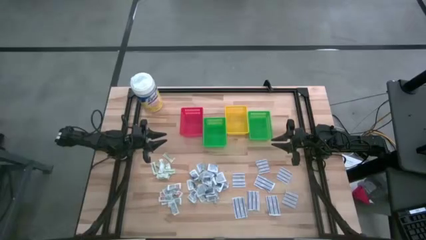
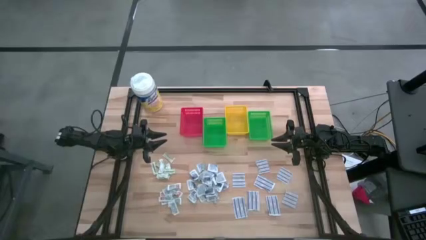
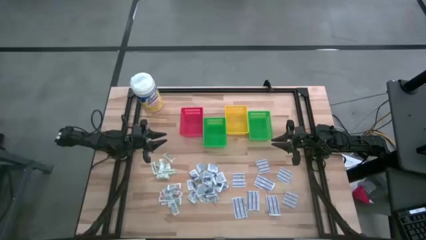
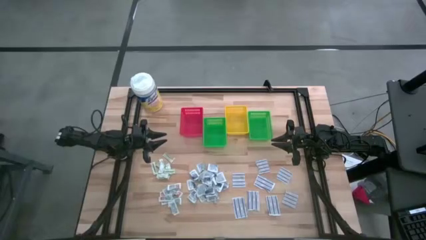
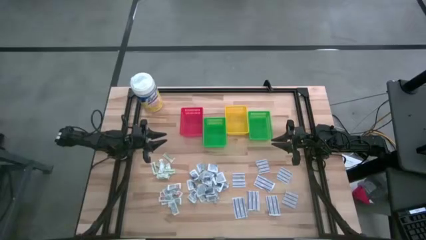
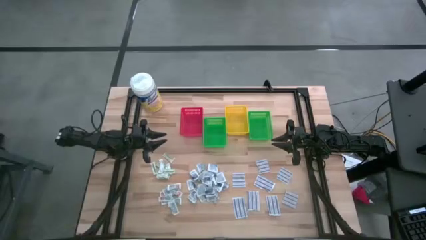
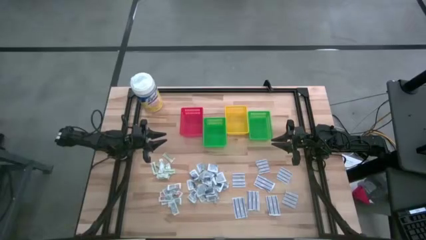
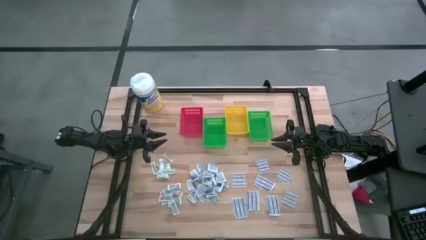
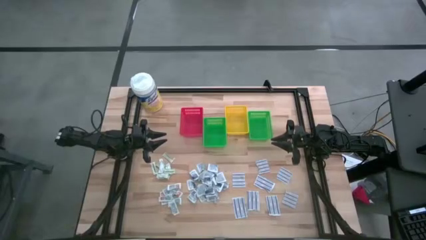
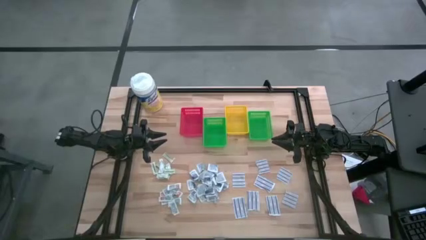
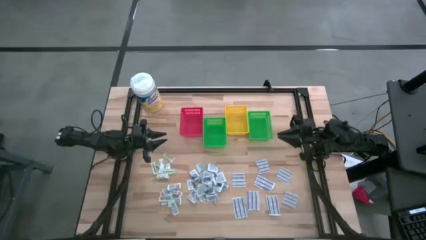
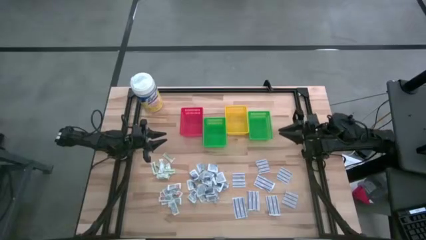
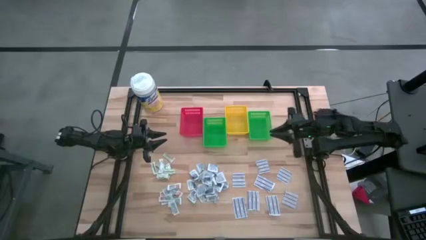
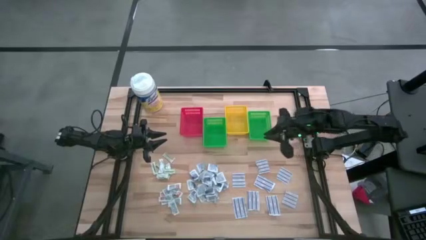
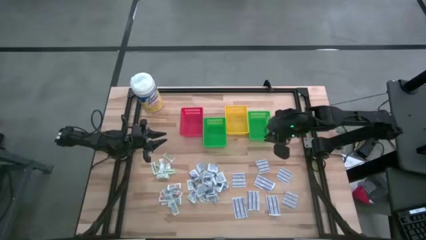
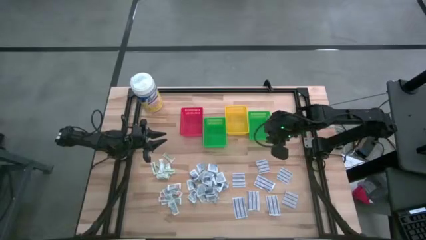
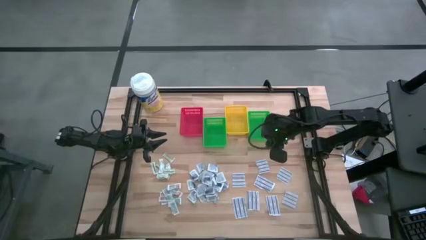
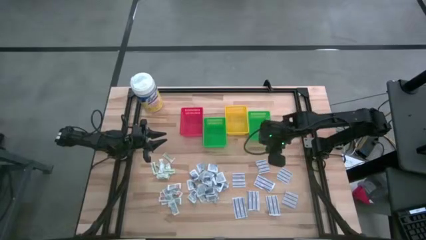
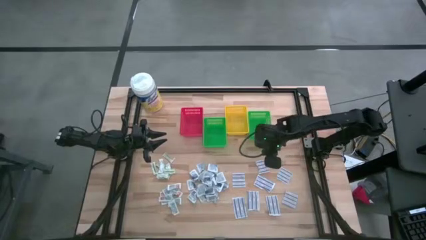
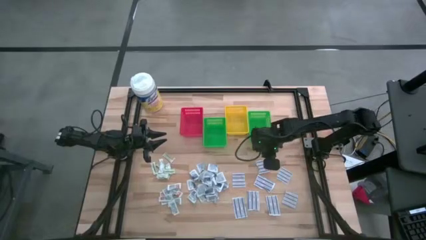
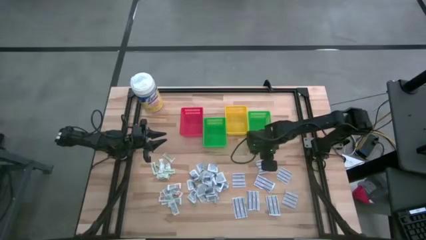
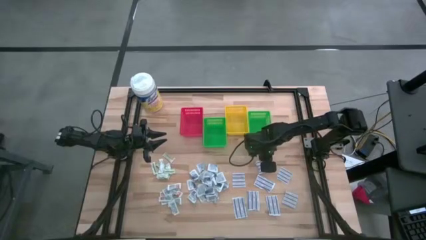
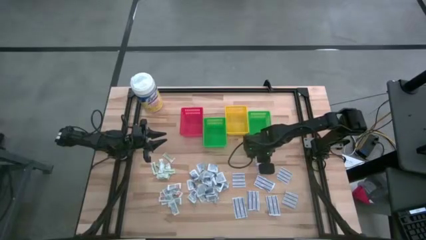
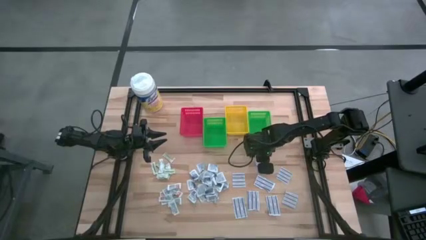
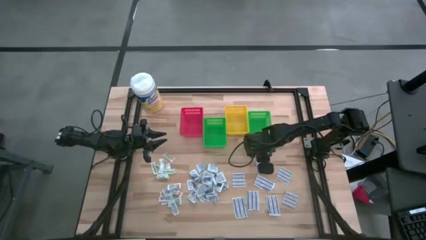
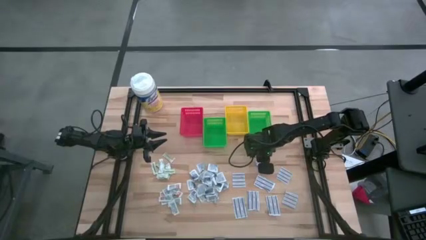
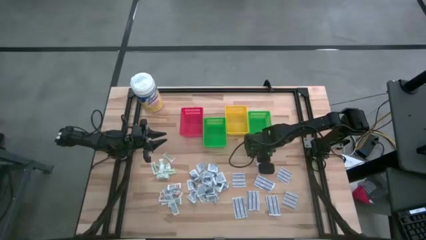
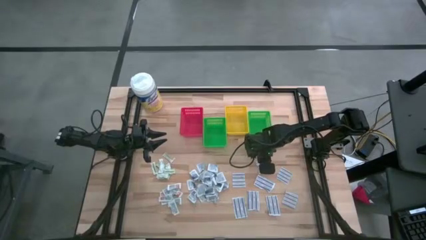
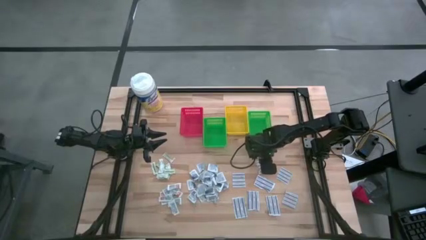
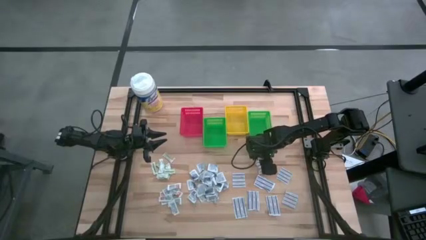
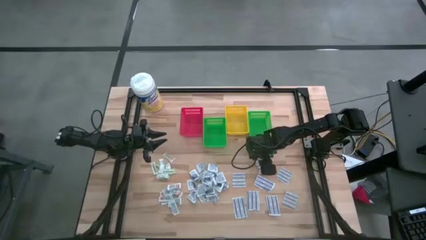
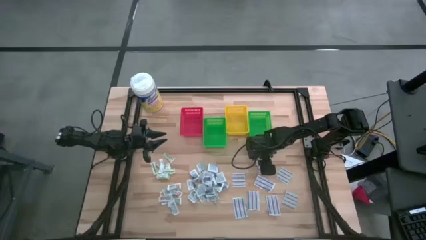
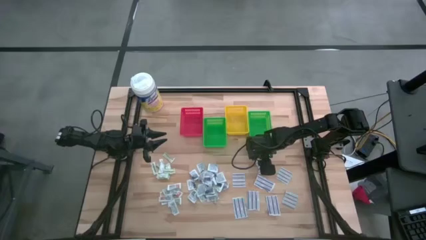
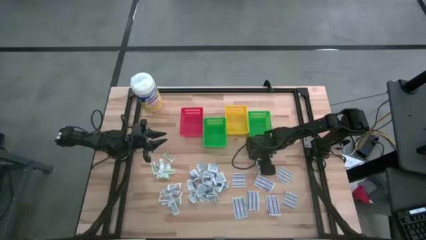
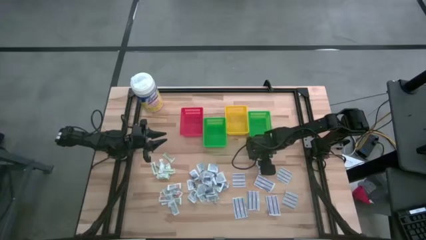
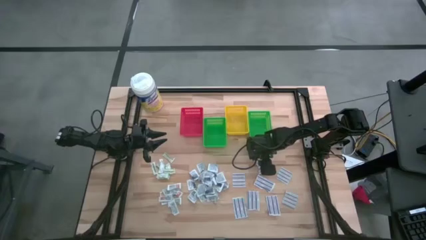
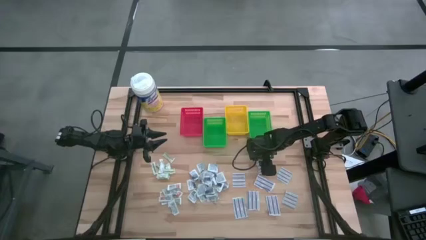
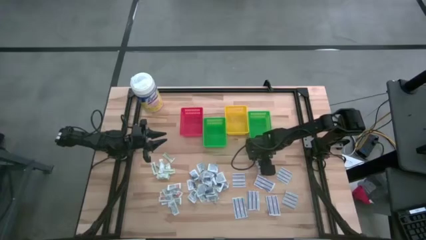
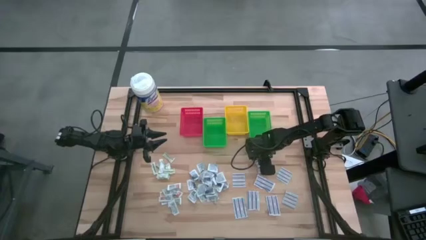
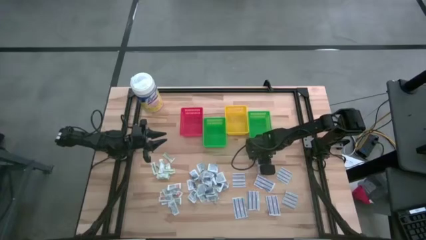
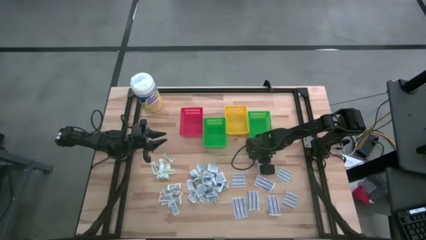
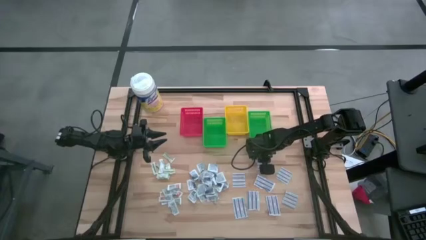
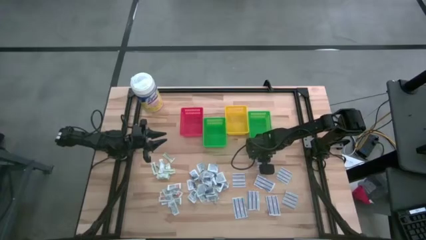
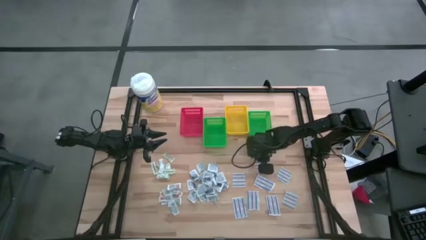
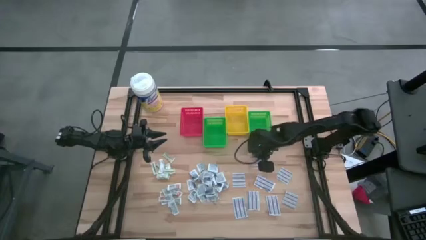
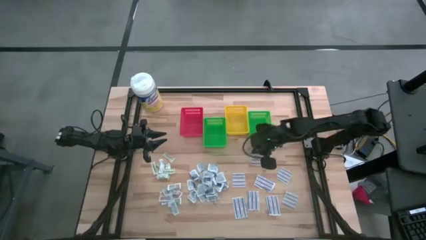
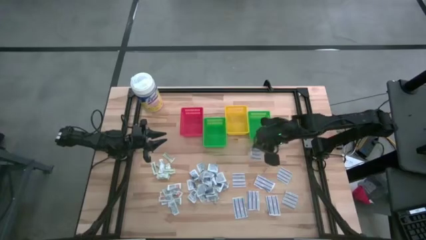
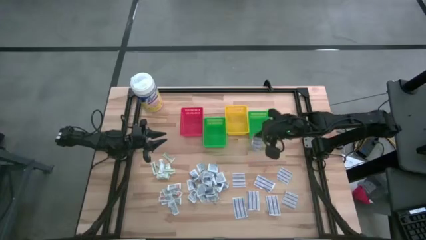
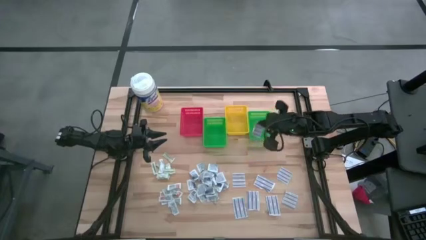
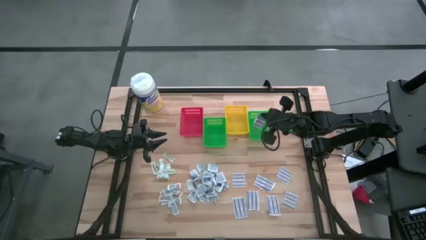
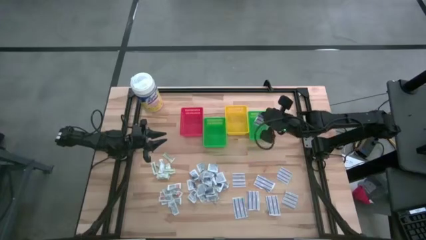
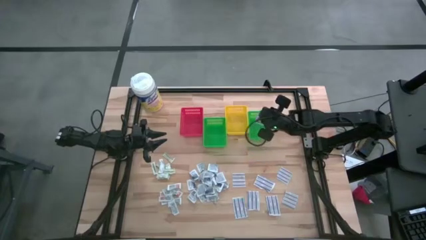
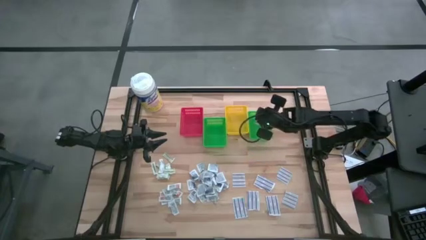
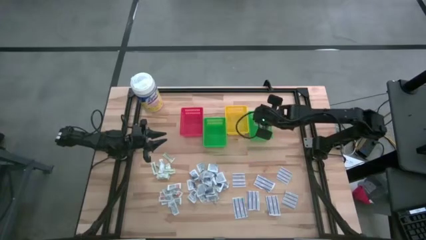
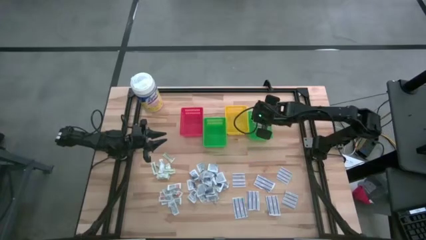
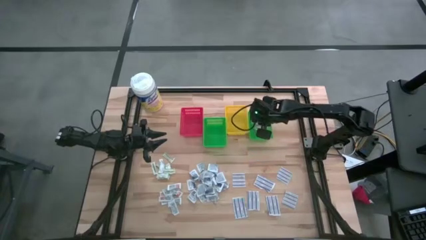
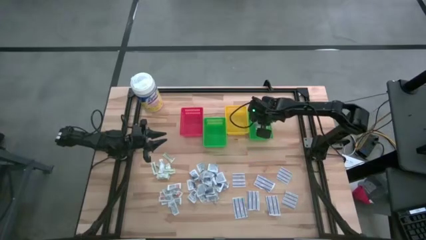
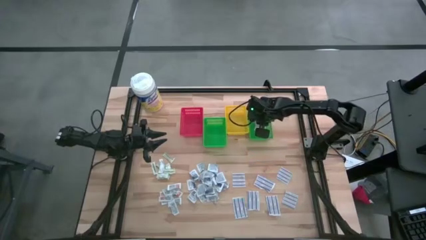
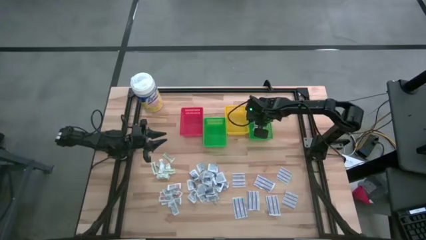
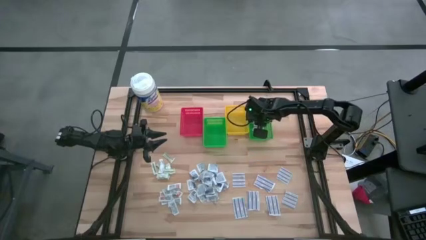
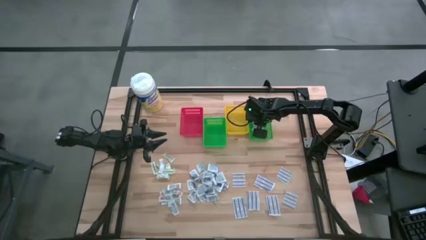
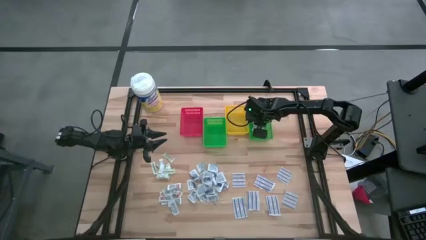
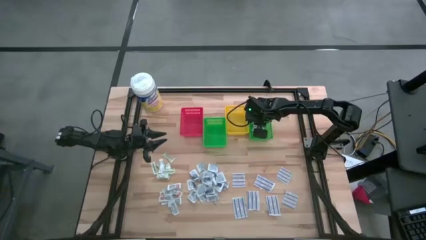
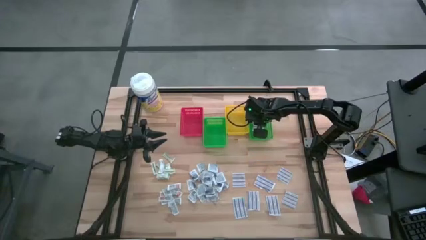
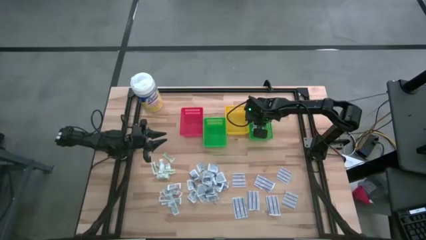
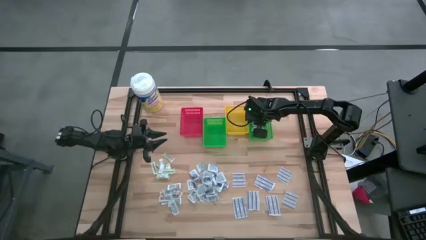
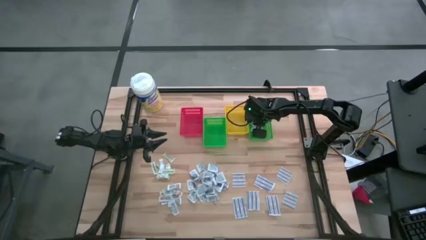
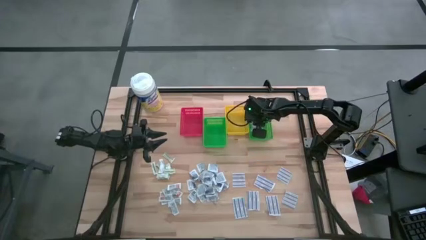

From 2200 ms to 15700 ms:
Task: Pick & Place First Aid Supplies
Put the blue bandage into the right green basket
